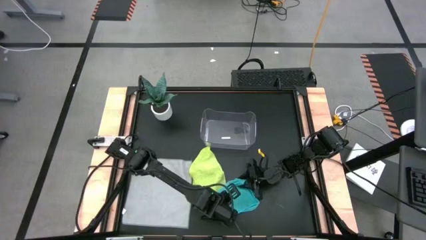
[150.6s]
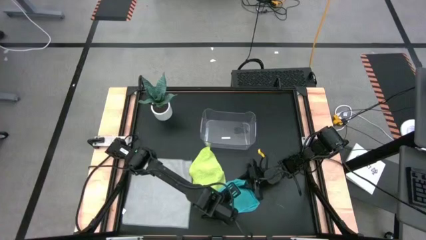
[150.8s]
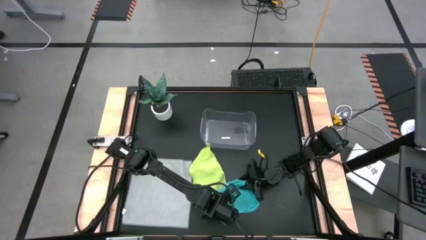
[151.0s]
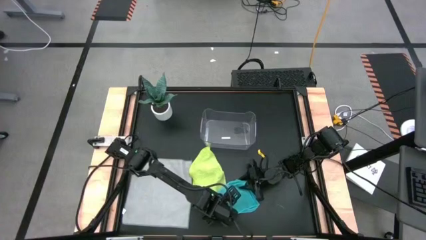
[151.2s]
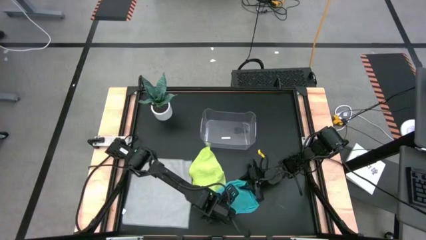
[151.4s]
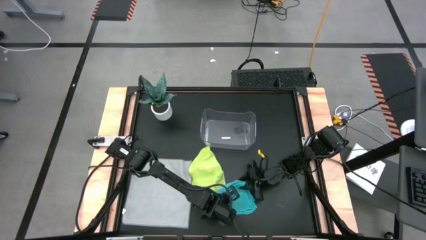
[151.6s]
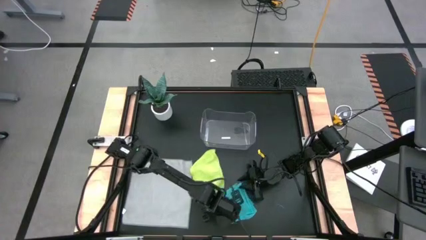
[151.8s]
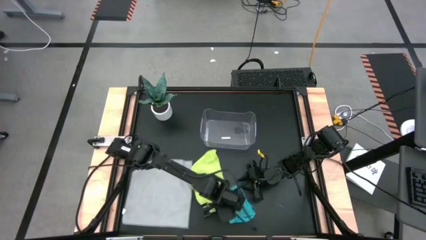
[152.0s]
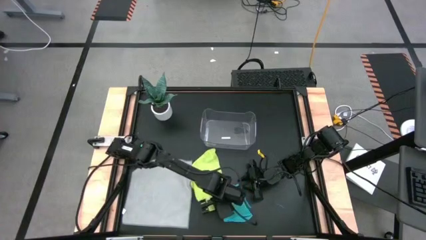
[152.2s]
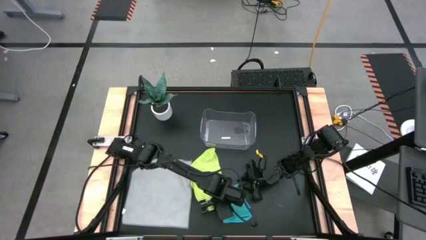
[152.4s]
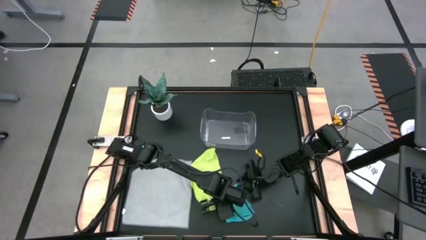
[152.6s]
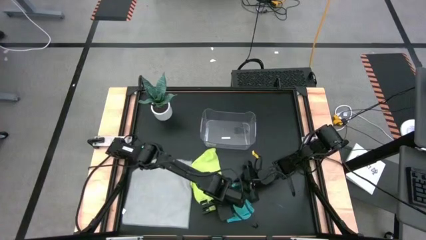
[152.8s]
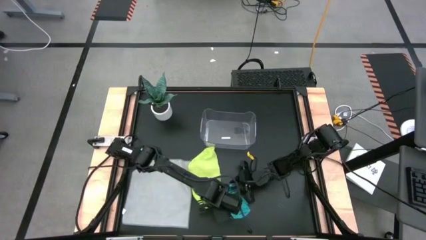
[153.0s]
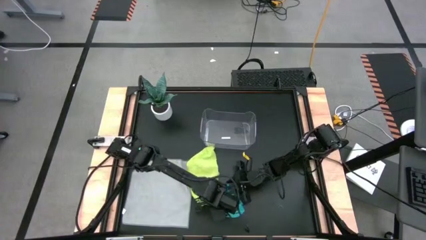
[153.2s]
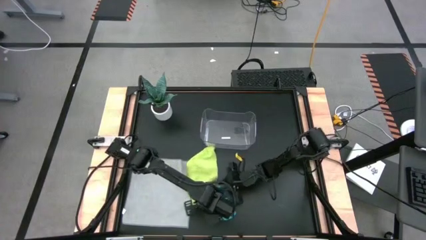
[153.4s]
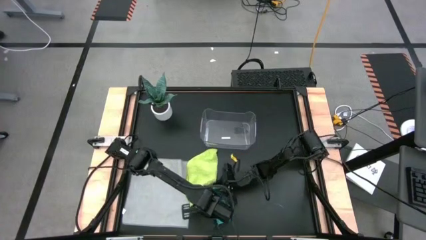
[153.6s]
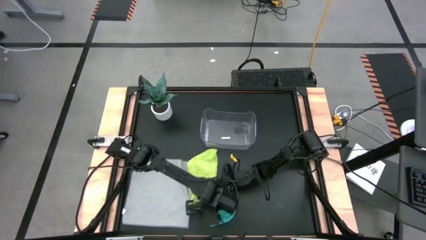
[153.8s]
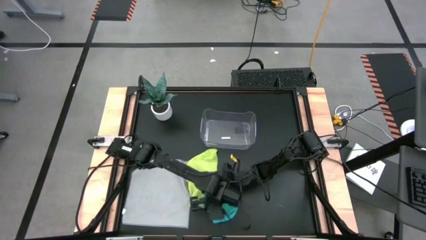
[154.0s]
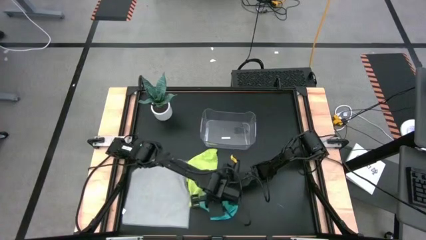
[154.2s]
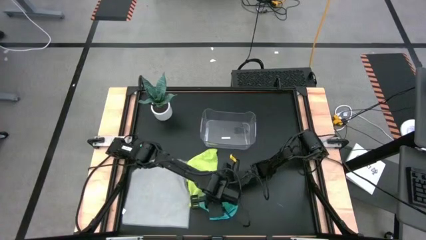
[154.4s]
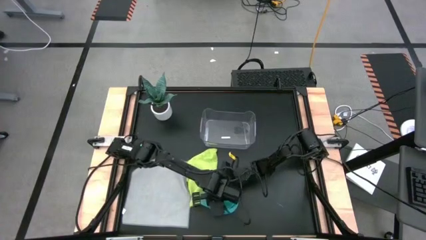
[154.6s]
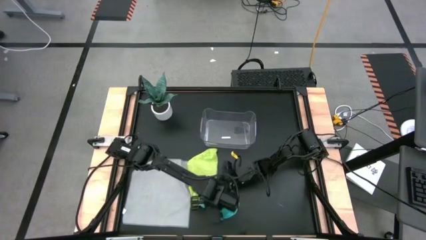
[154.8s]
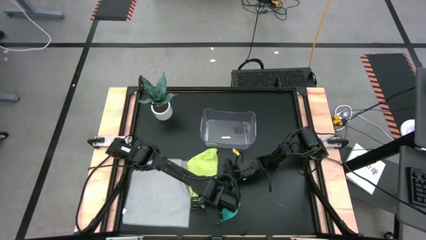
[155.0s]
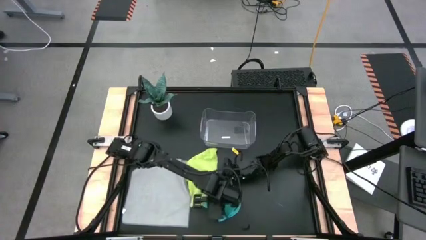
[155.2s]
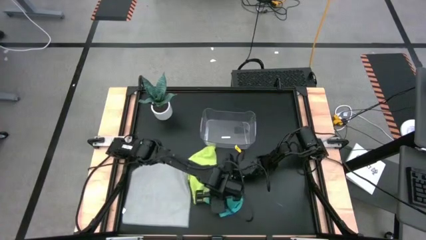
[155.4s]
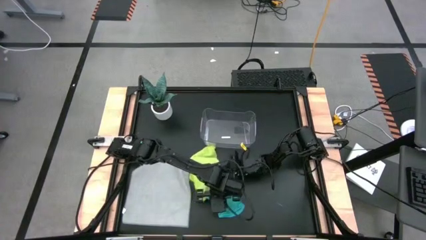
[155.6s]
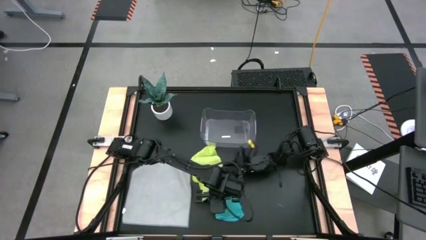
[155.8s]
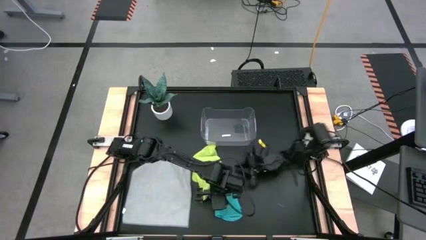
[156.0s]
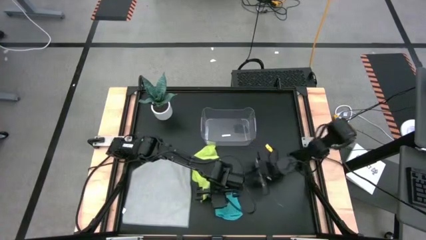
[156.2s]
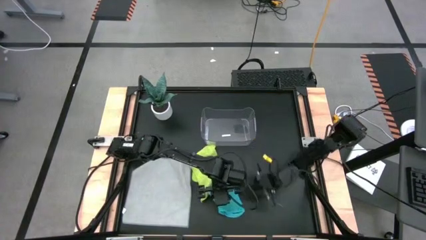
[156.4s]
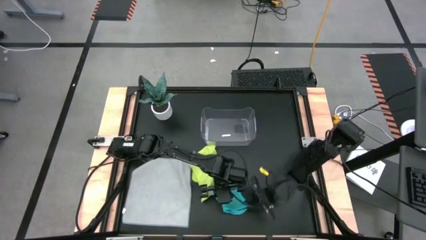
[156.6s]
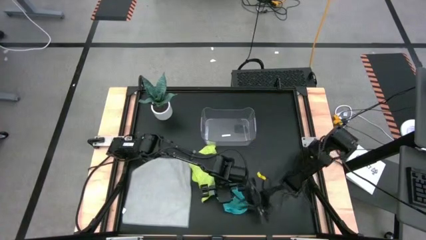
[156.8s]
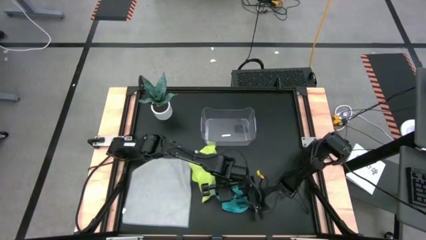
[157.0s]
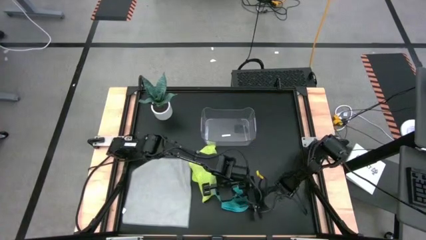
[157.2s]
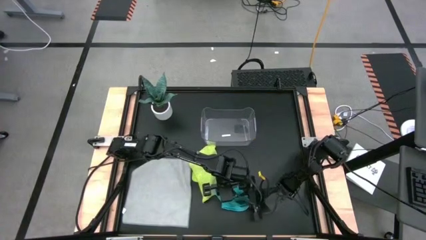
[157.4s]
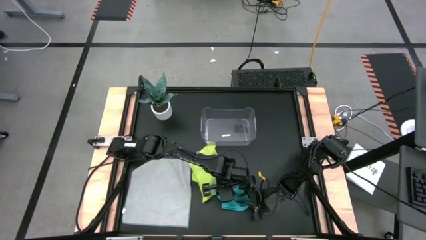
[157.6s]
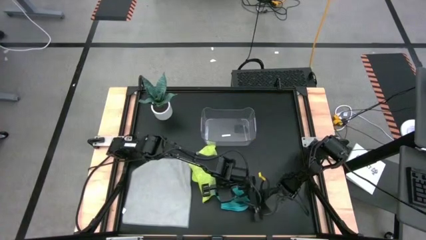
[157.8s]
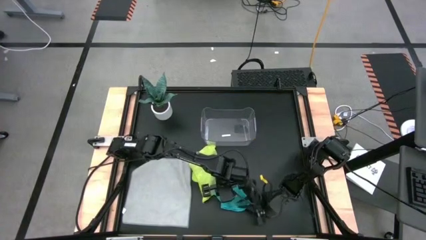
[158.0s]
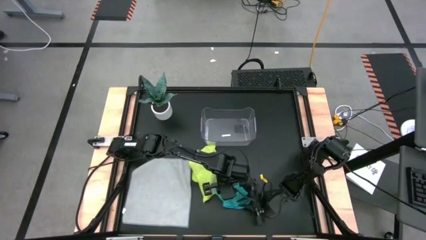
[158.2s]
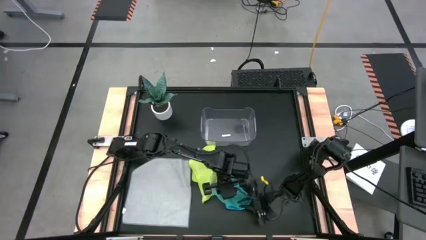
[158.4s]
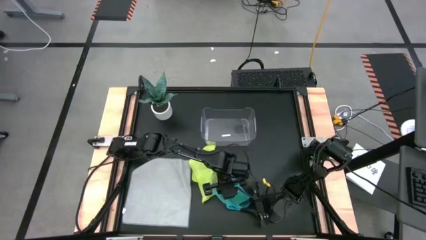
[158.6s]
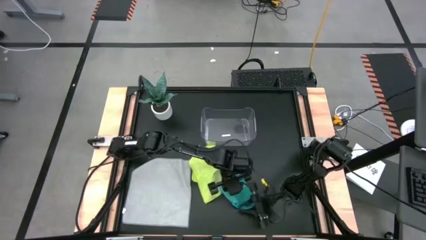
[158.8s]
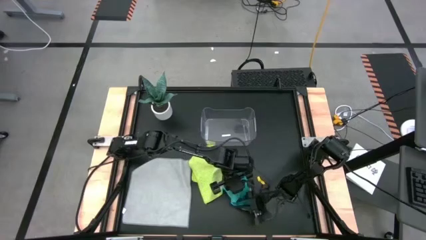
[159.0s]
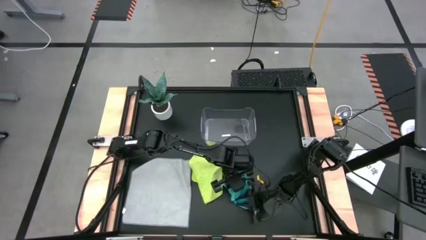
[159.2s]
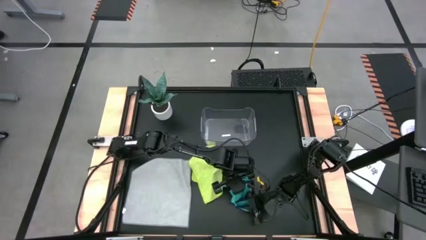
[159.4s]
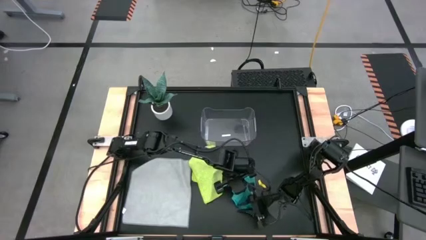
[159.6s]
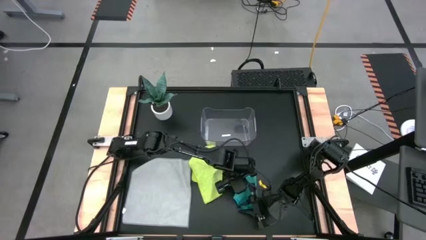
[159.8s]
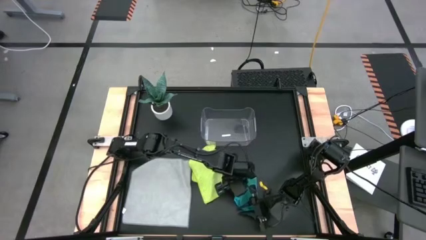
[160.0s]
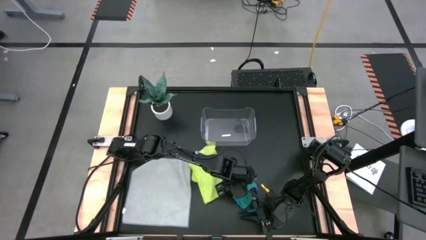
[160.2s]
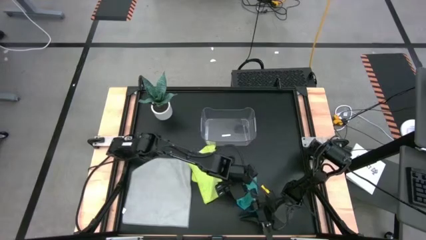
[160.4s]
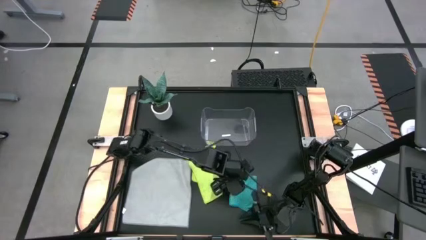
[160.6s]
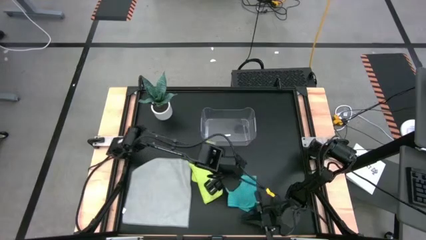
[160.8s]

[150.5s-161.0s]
Task: Fold microfiber towels
Fold the blue towel

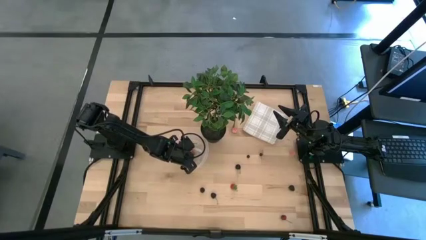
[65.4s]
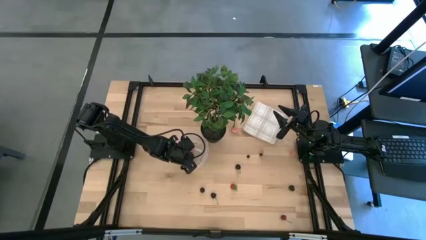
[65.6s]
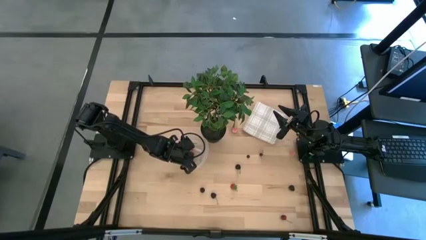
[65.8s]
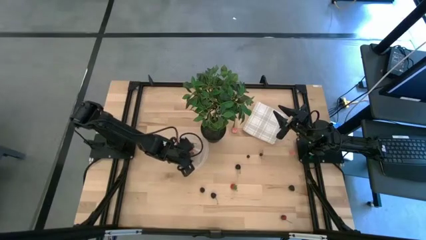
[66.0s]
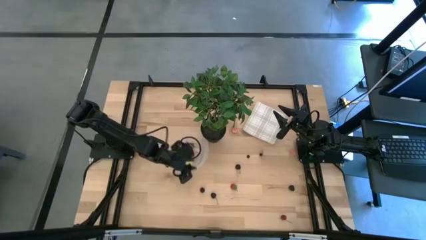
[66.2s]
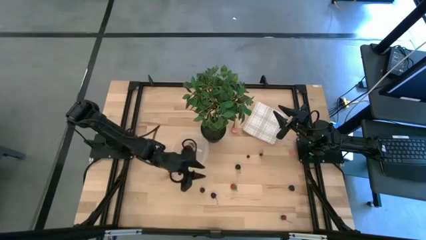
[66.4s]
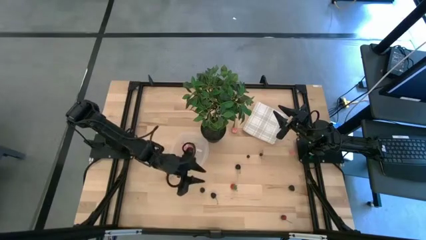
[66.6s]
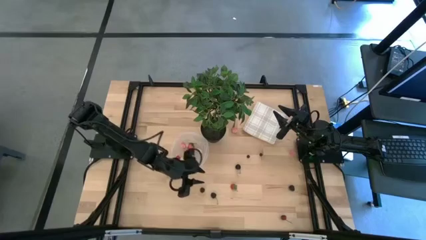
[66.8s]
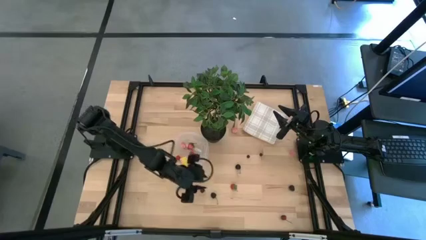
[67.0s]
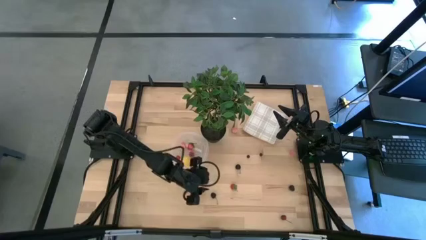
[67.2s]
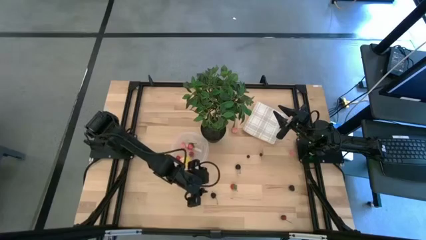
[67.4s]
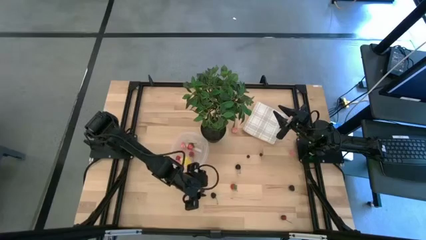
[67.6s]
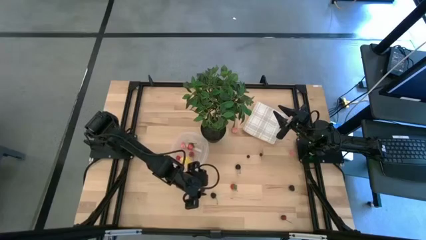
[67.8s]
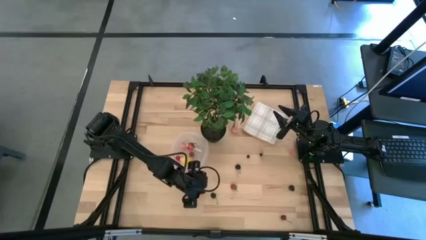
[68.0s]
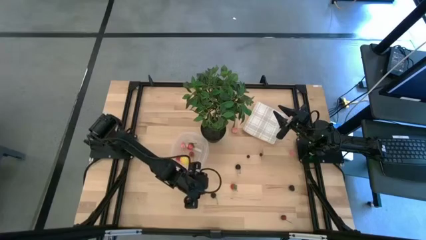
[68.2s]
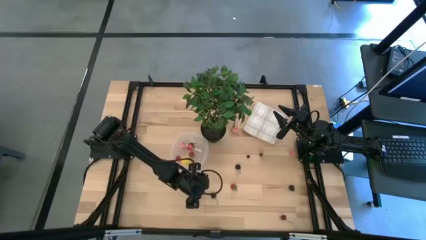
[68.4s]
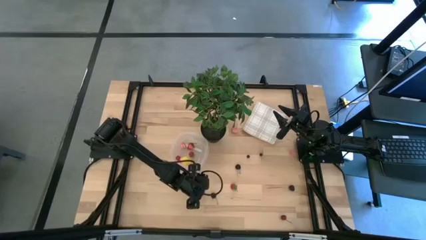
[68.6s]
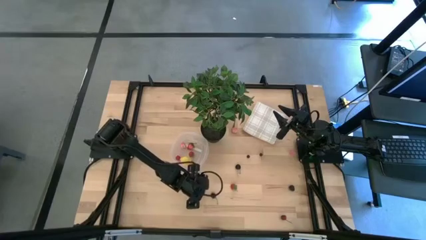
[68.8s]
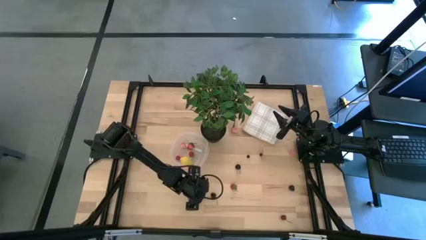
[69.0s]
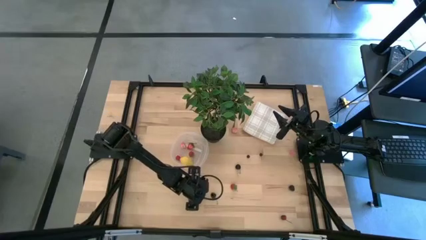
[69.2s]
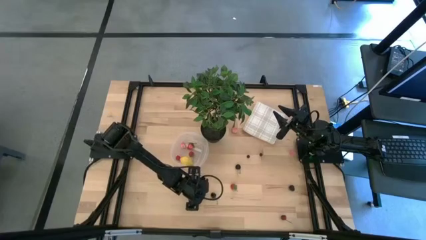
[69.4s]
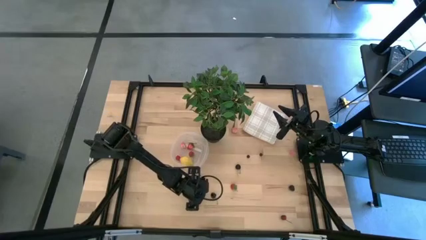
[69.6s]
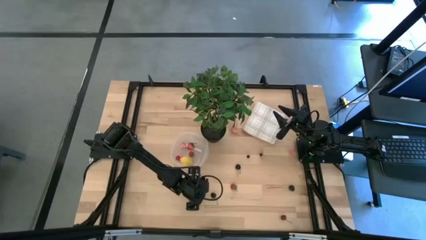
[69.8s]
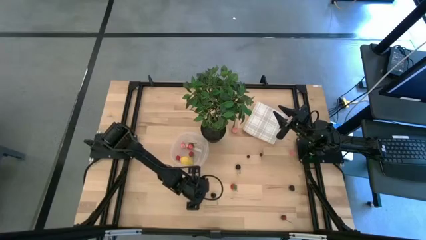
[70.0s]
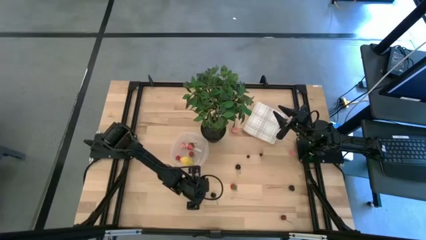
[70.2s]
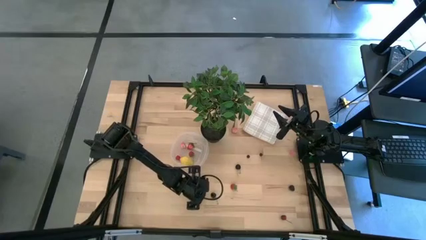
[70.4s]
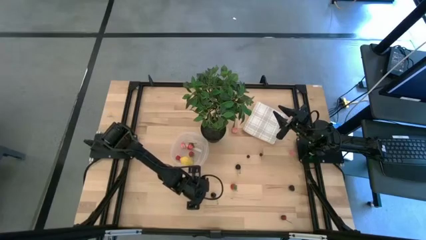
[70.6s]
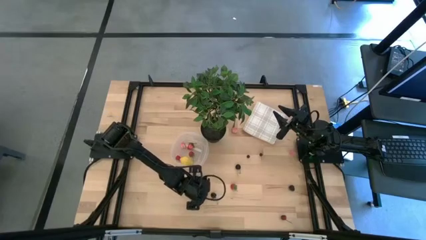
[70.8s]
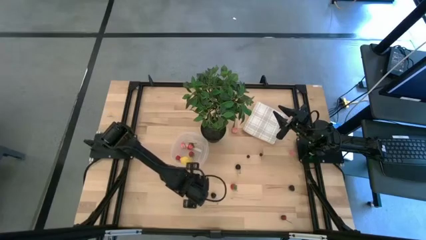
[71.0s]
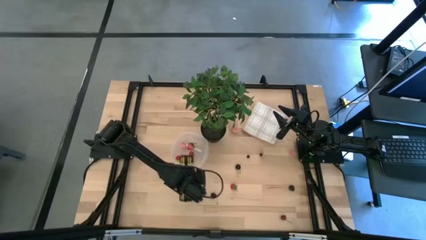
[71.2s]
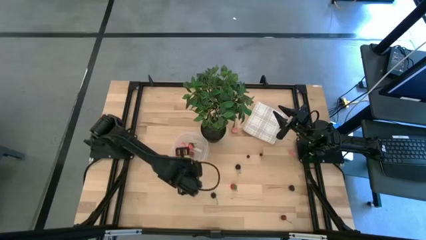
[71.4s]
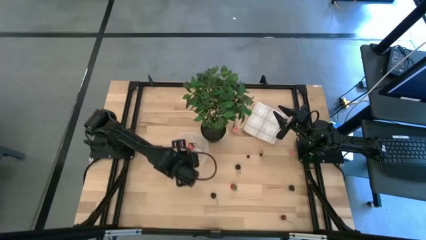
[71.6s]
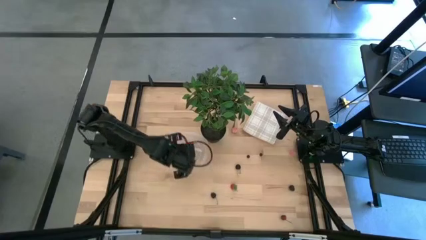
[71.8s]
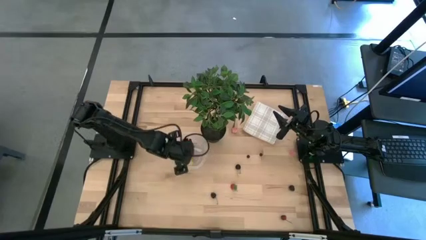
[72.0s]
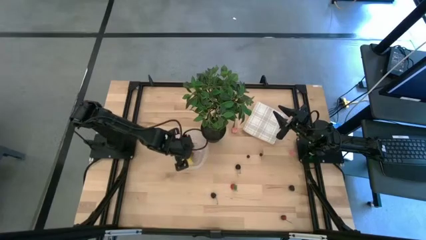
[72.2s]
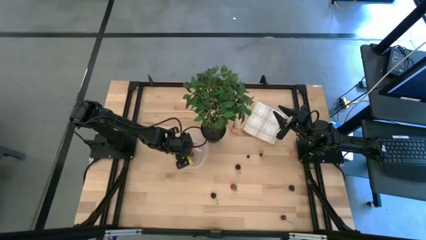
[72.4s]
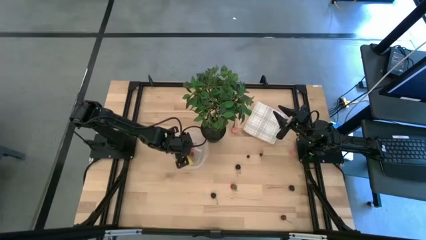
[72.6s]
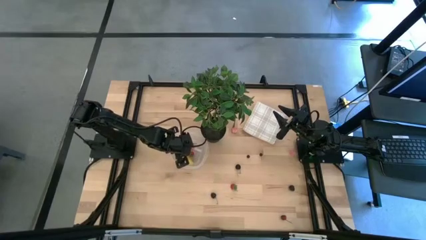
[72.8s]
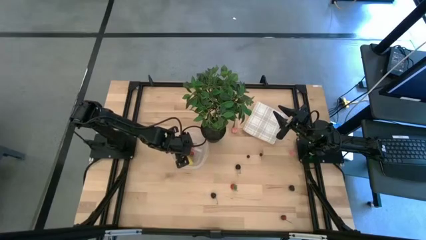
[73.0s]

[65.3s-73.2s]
Task: Pick and placing Produce into tupperware
Put the left blackberry into the transparent bin
